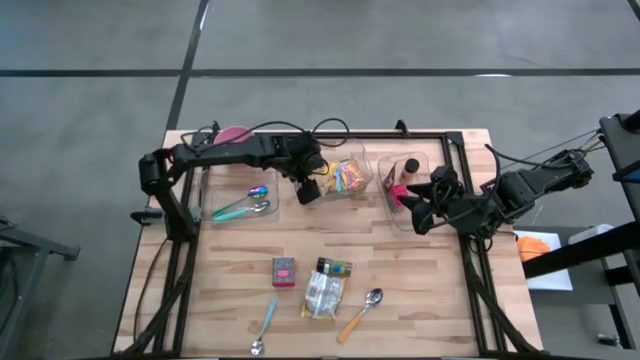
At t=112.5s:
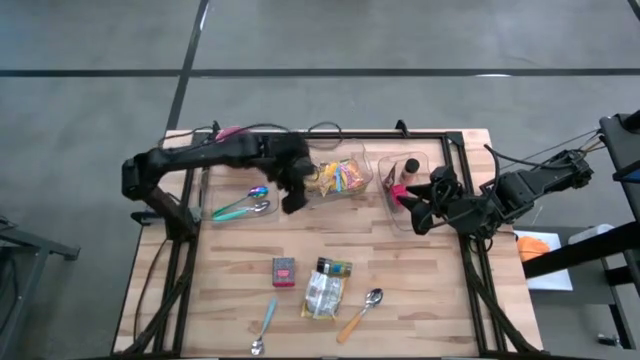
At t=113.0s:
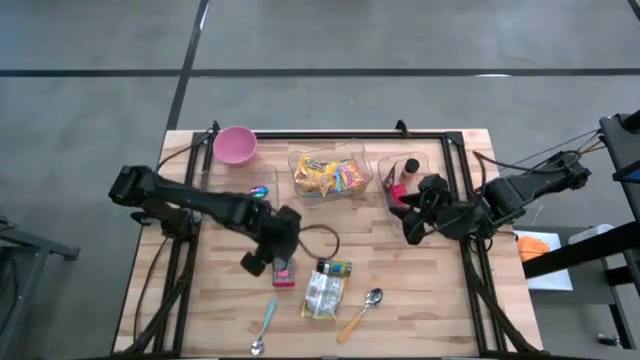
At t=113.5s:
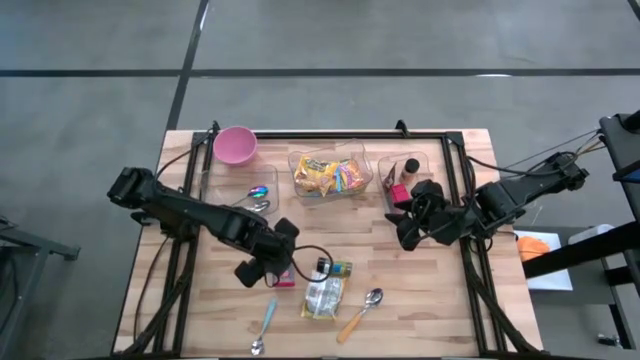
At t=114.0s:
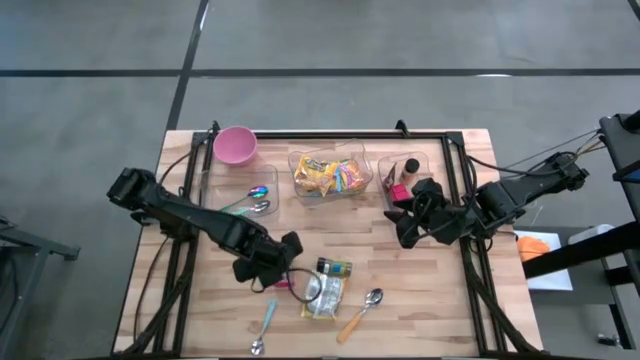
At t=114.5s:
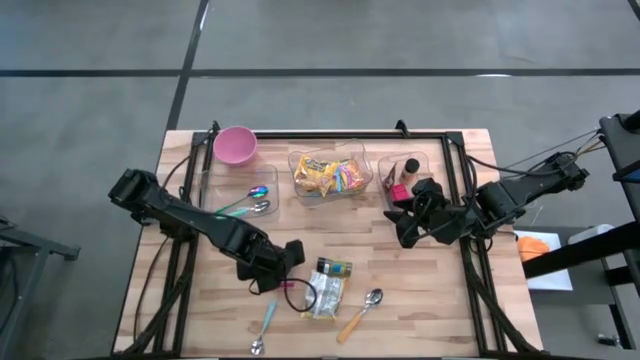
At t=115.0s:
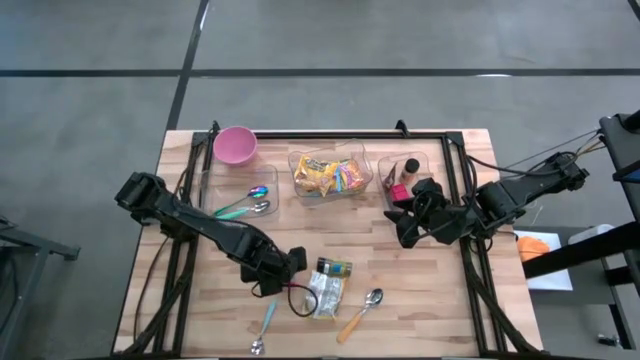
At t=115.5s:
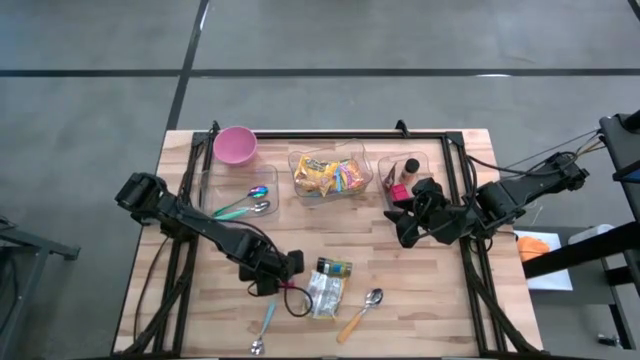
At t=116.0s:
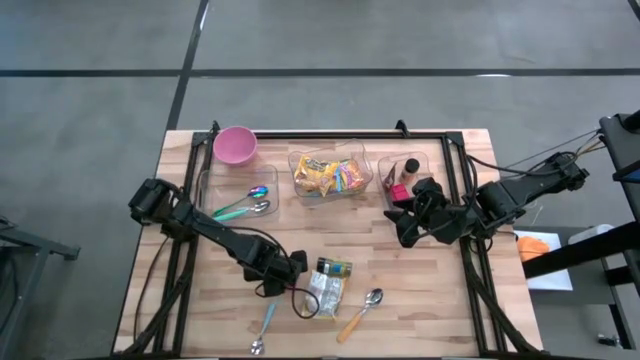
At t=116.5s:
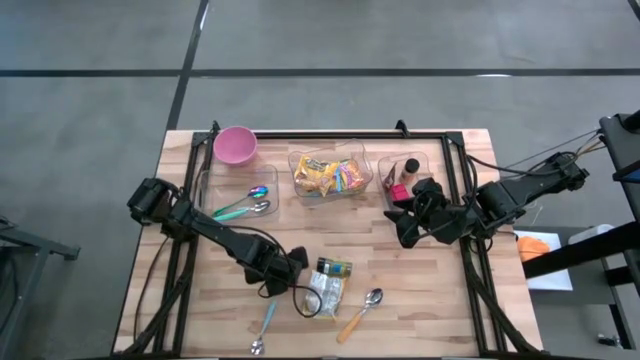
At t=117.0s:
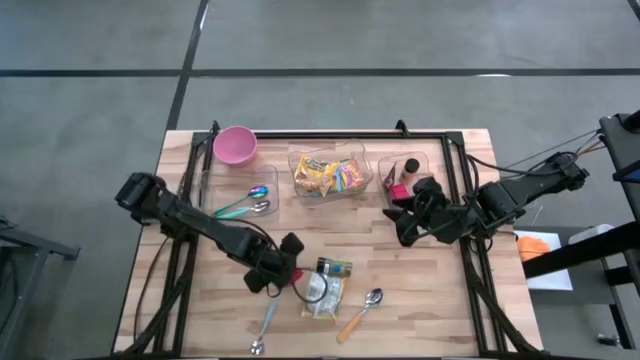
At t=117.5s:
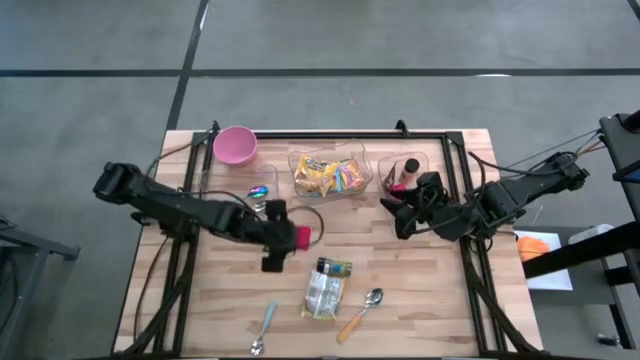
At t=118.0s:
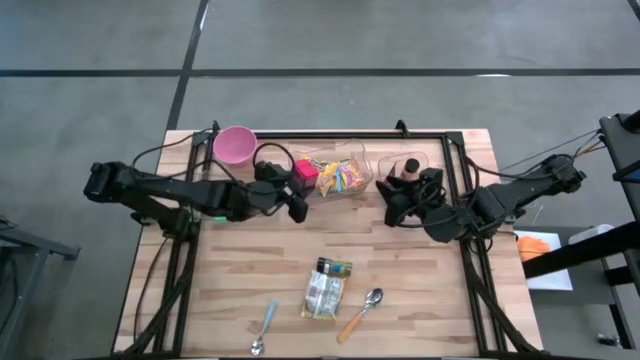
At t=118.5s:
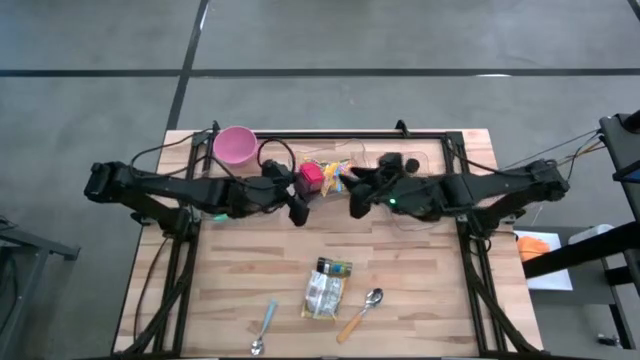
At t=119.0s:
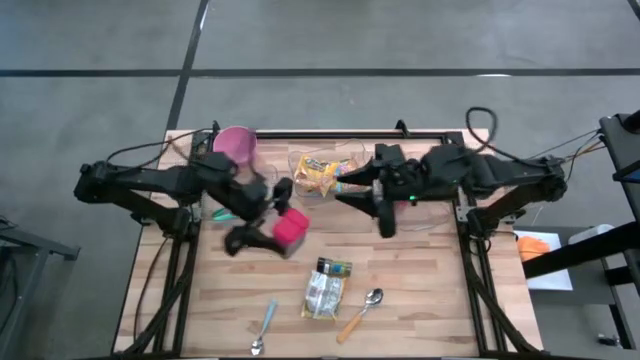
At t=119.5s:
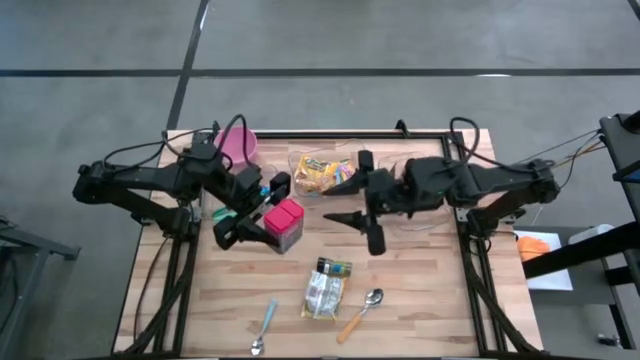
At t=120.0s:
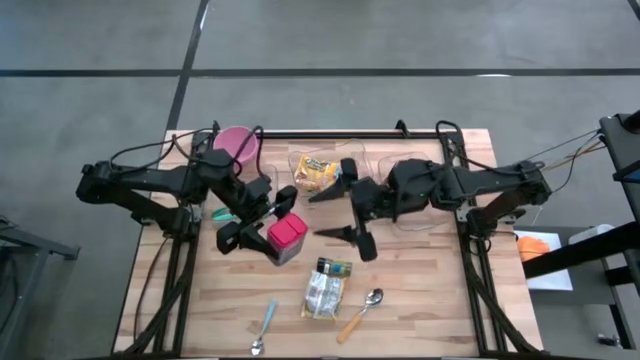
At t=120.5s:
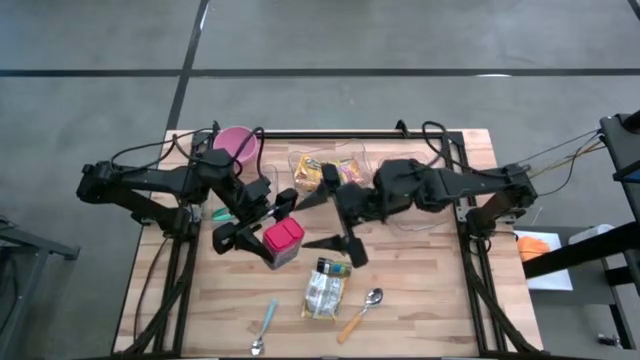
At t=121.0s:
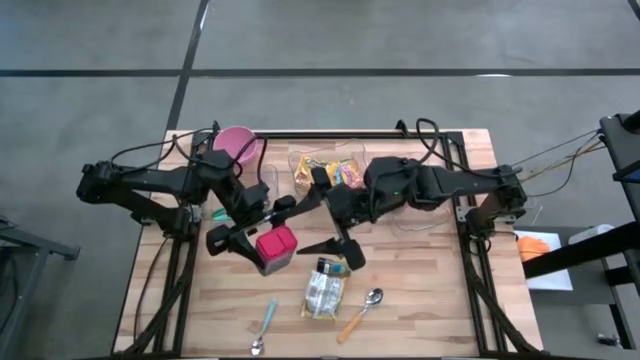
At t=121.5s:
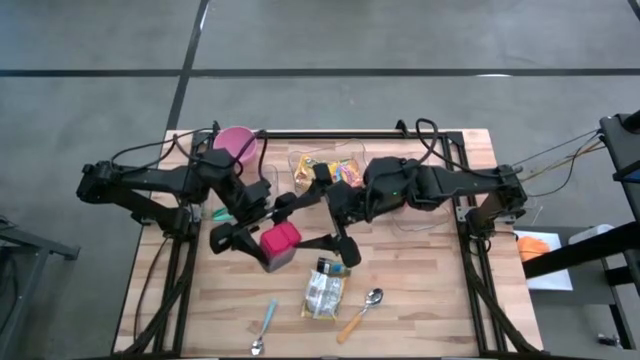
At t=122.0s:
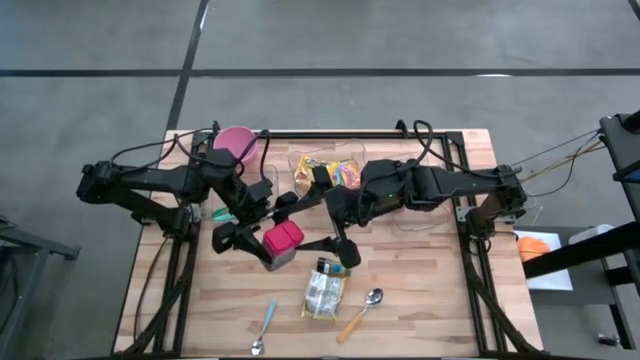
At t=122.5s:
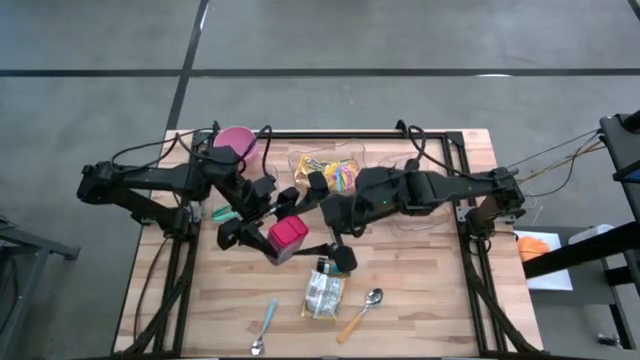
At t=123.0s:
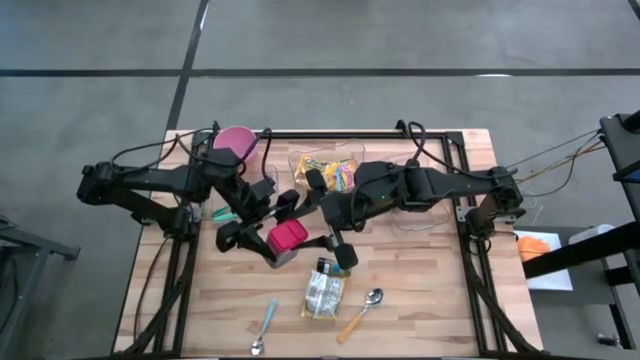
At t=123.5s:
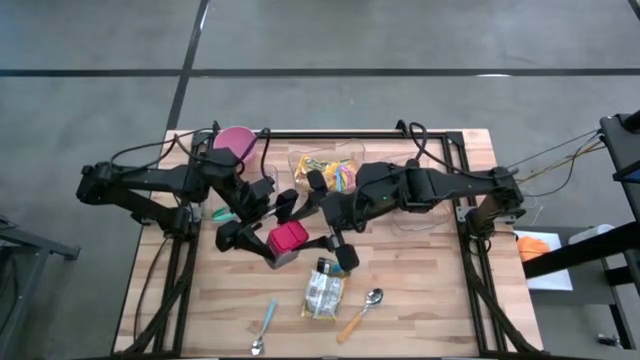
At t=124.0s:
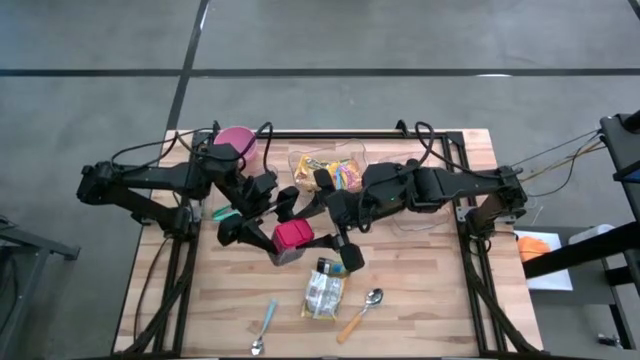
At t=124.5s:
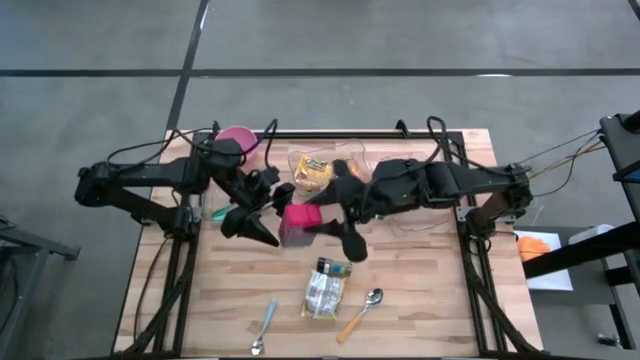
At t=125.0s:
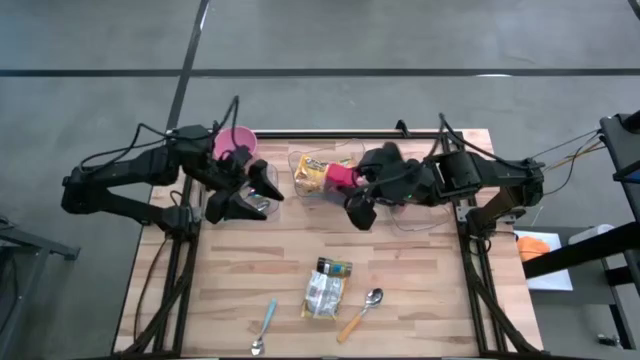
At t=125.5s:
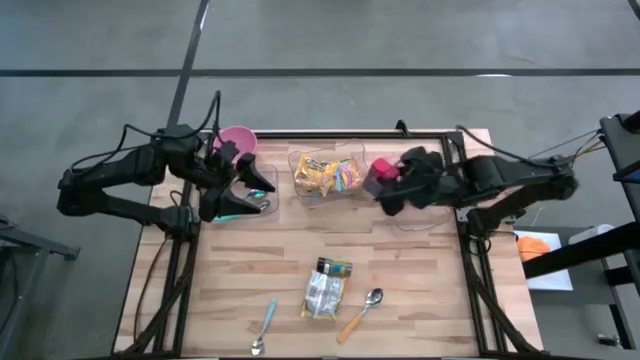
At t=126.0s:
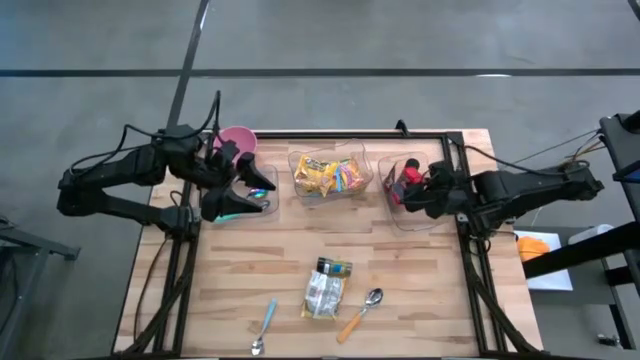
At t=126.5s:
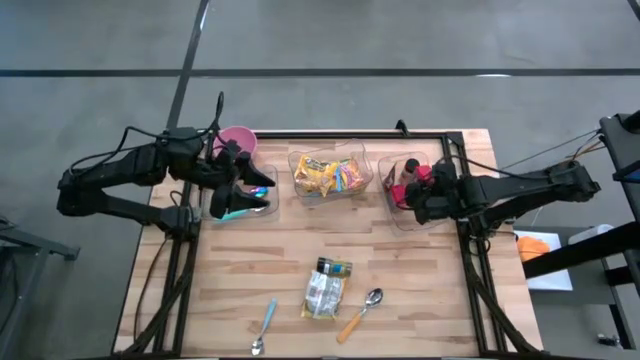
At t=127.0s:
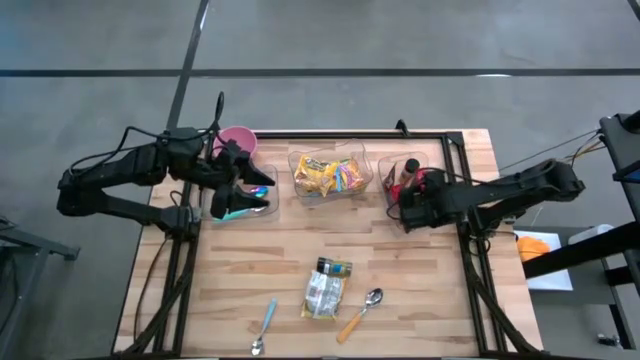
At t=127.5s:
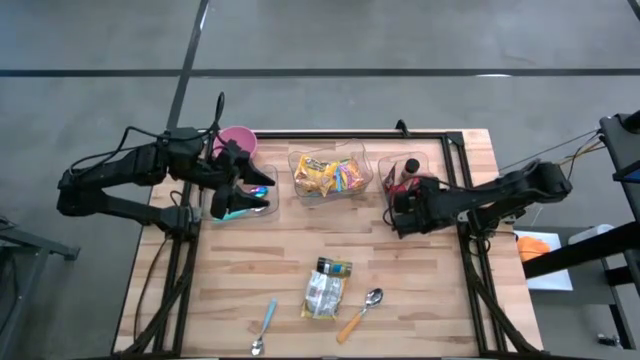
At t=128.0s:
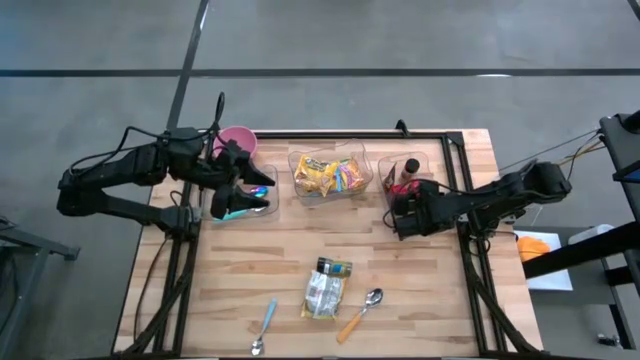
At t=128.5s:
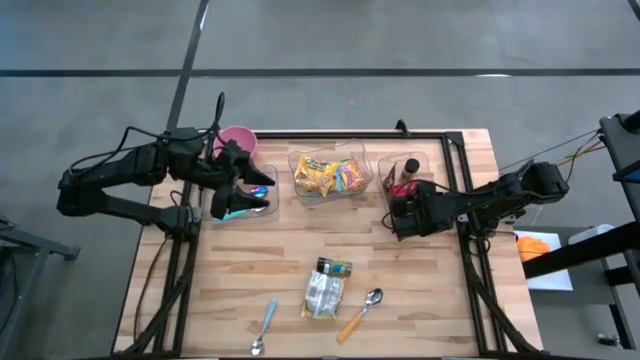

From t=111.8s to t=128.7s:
Put the red seasoning can into the right transparent bin

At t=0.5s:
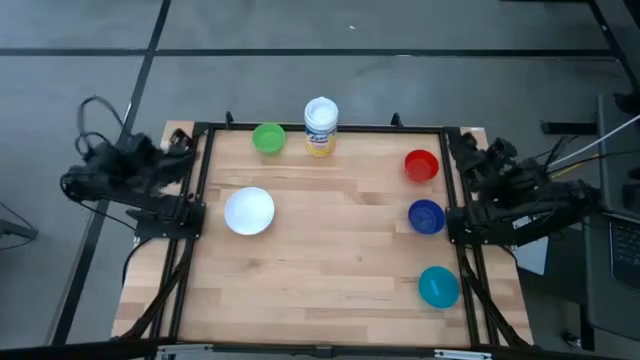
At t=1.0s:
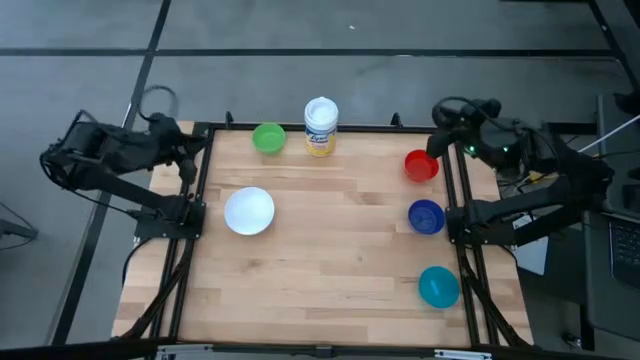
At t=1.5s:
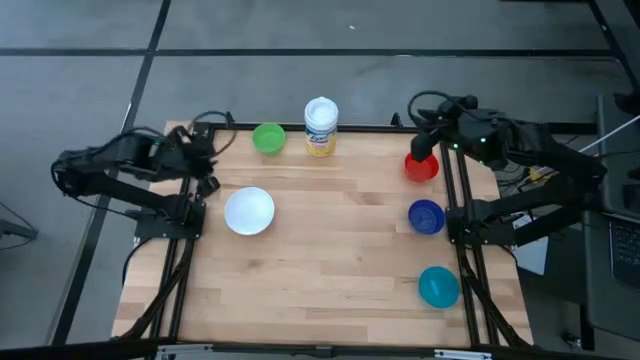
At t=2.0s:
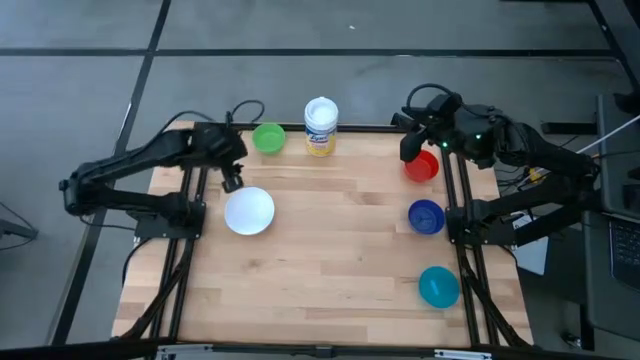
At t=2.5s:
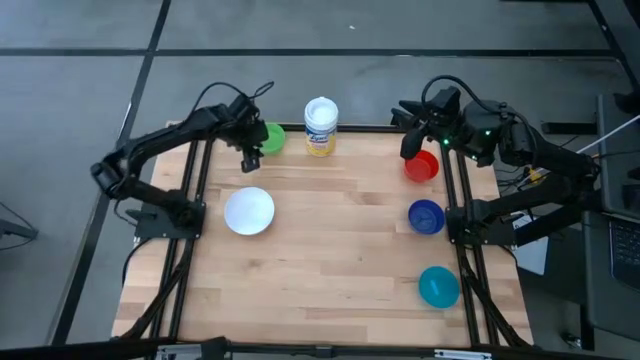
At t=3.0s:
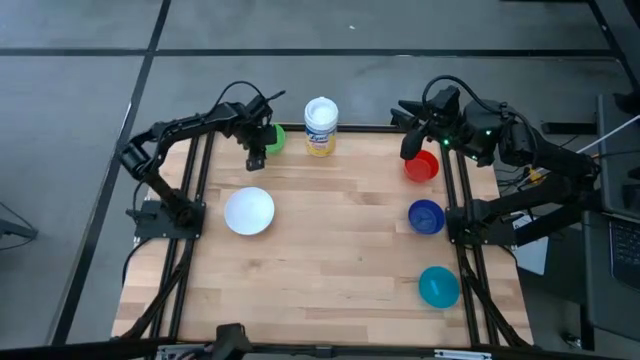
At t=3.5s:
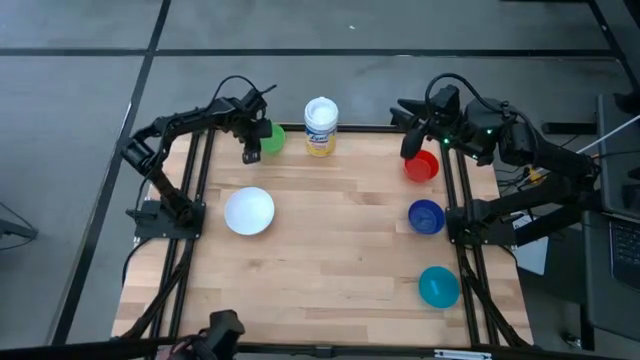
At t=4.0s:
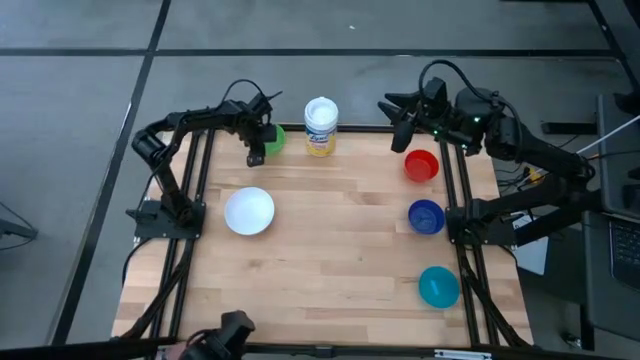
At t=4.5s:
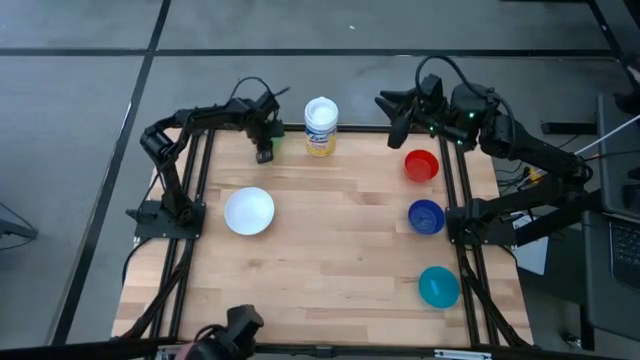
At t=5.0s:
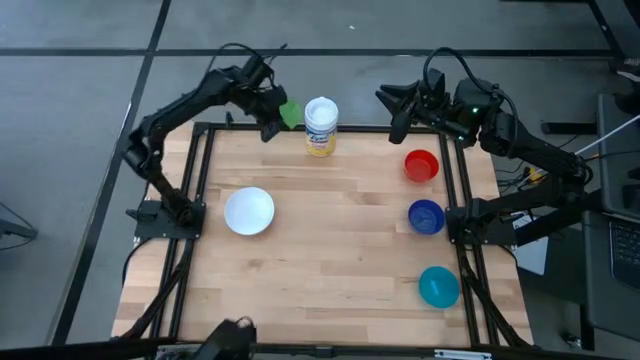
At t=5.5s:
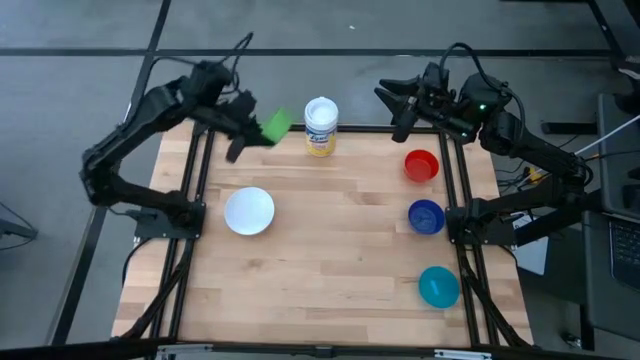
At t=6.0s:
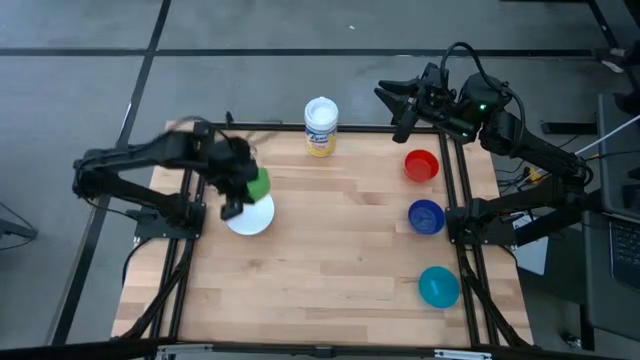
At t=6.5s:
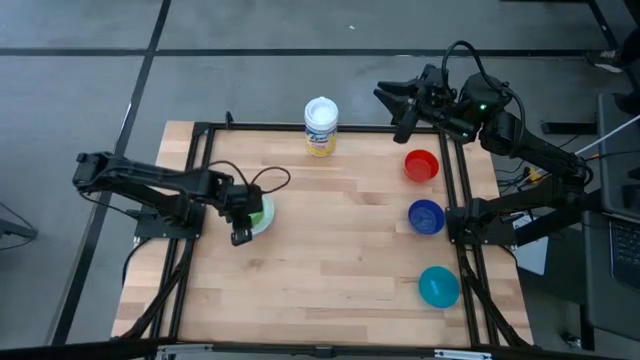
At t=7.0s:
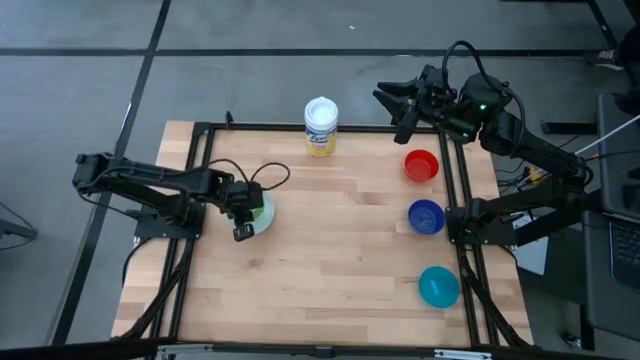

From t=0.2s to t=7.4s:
Stack the green bowl on top of the white bowl on the table
